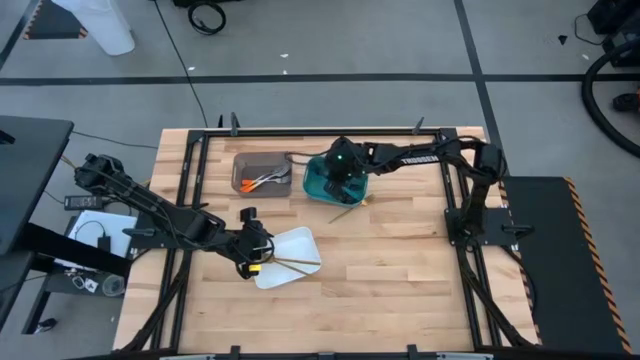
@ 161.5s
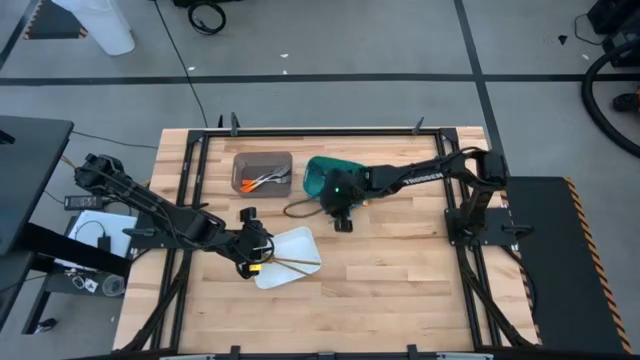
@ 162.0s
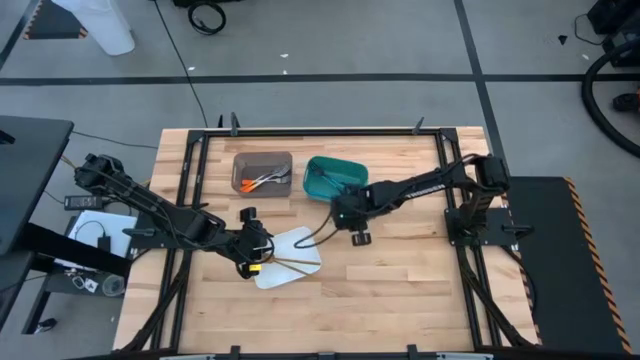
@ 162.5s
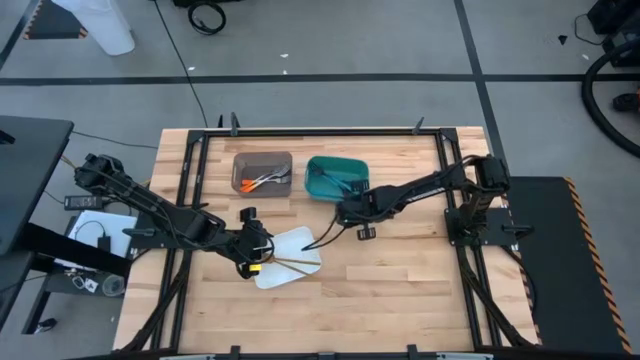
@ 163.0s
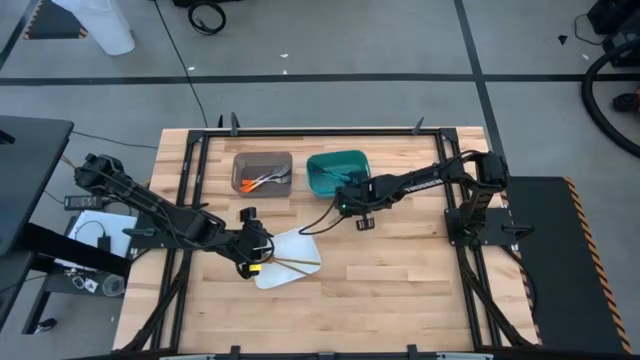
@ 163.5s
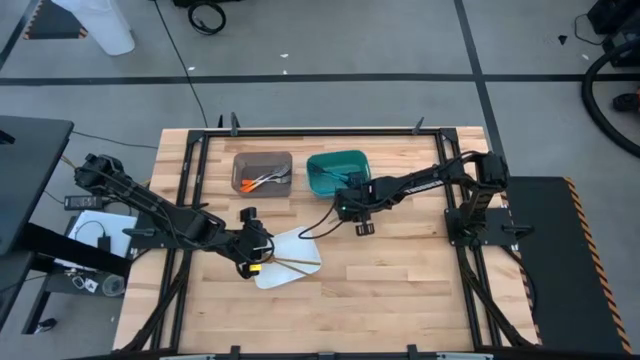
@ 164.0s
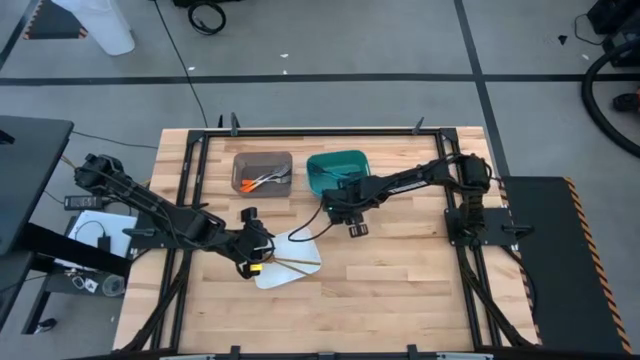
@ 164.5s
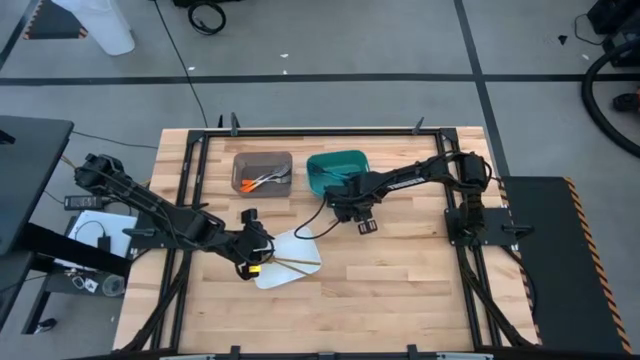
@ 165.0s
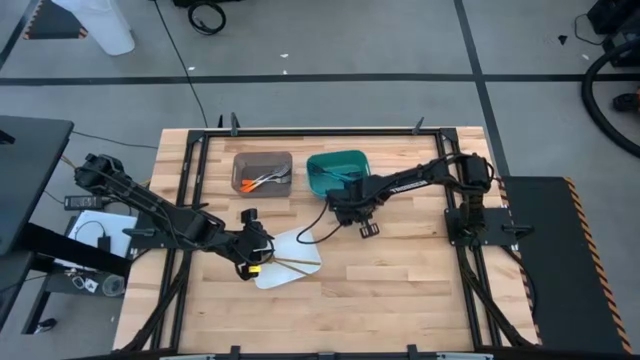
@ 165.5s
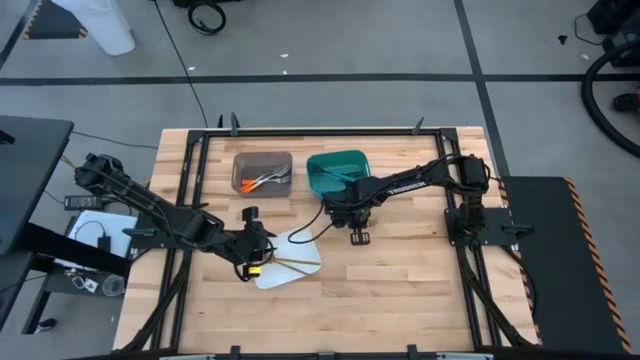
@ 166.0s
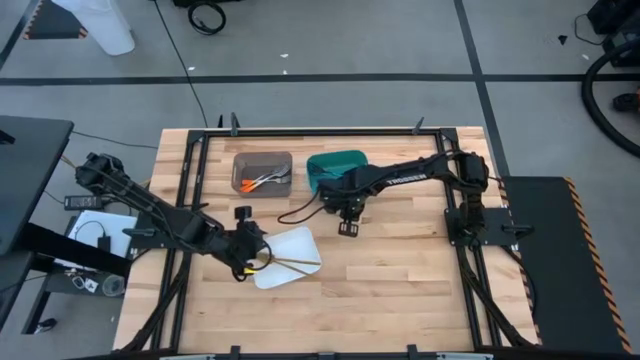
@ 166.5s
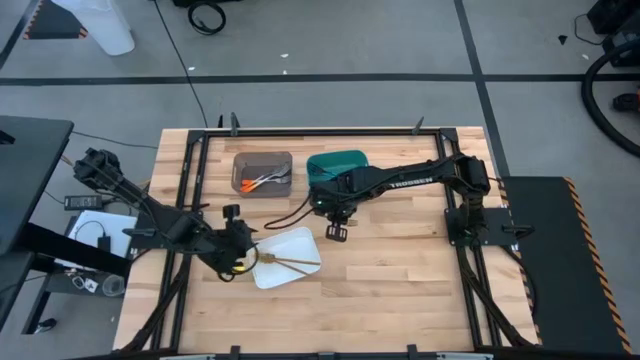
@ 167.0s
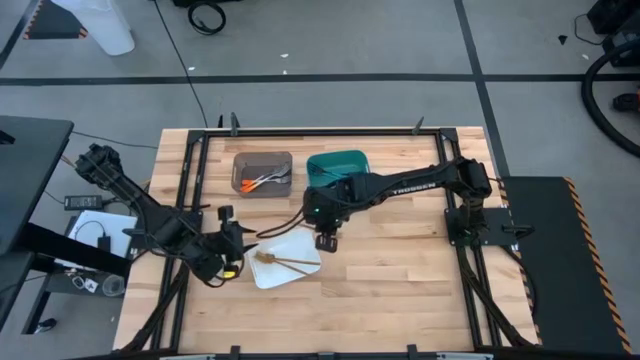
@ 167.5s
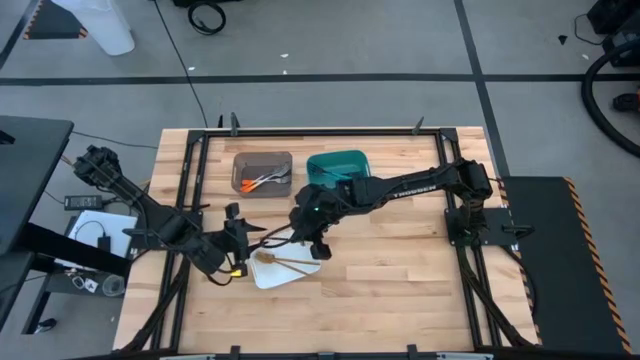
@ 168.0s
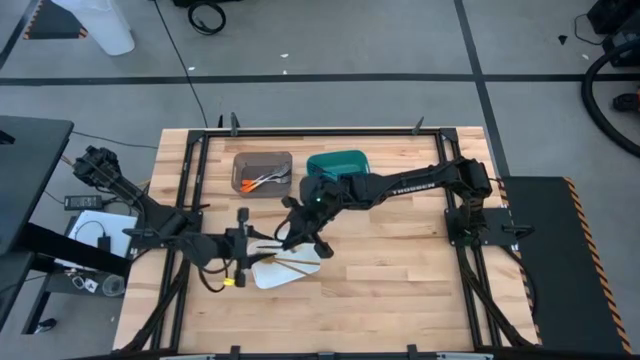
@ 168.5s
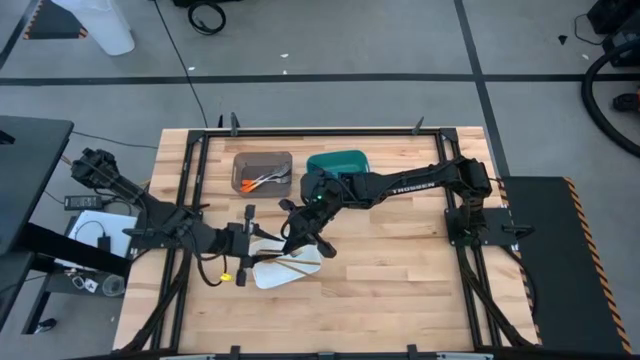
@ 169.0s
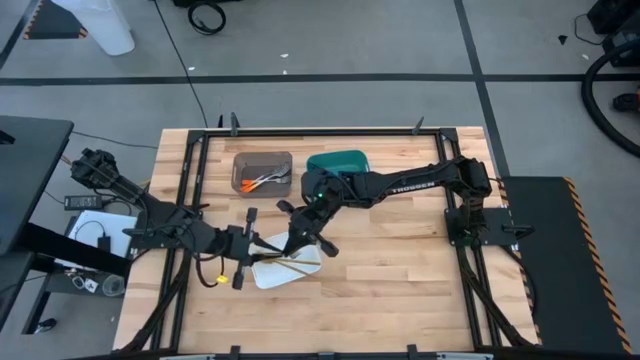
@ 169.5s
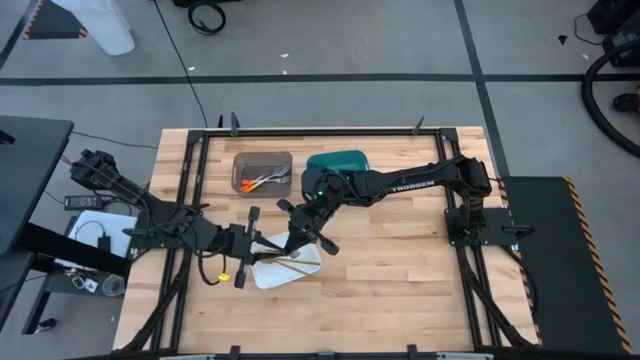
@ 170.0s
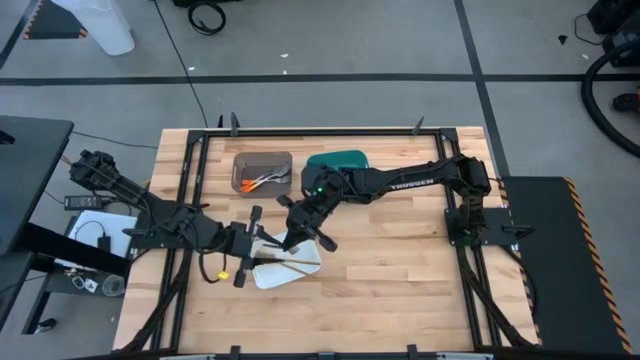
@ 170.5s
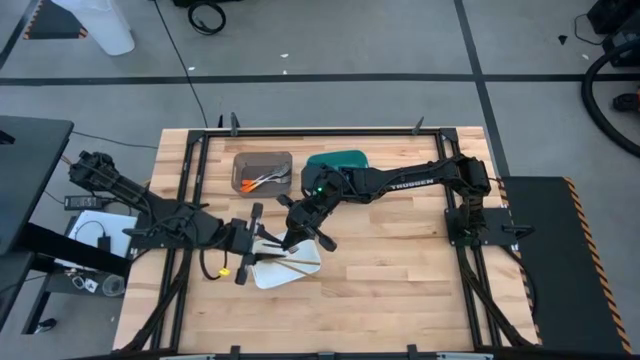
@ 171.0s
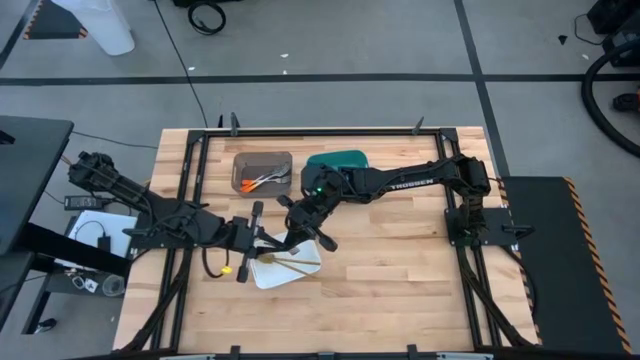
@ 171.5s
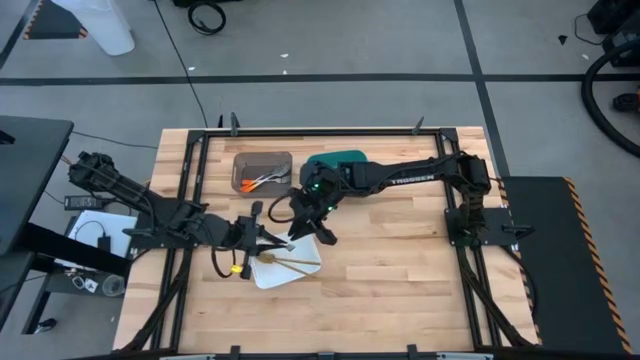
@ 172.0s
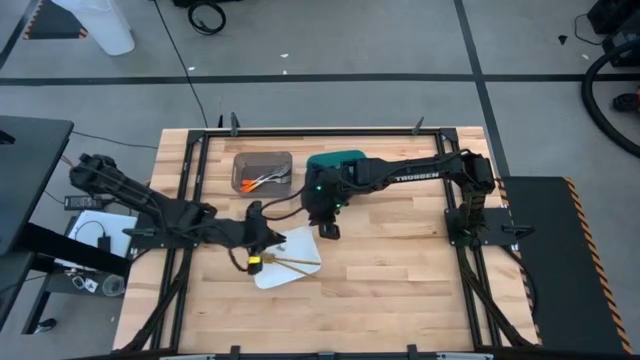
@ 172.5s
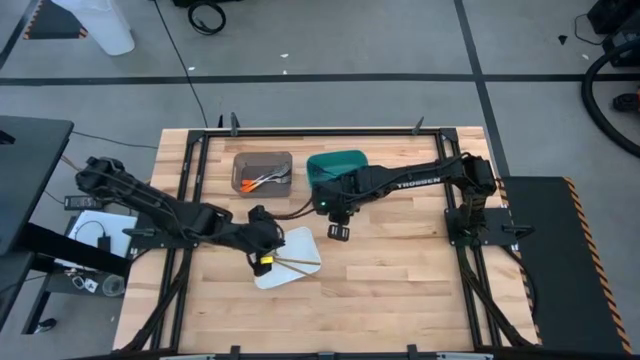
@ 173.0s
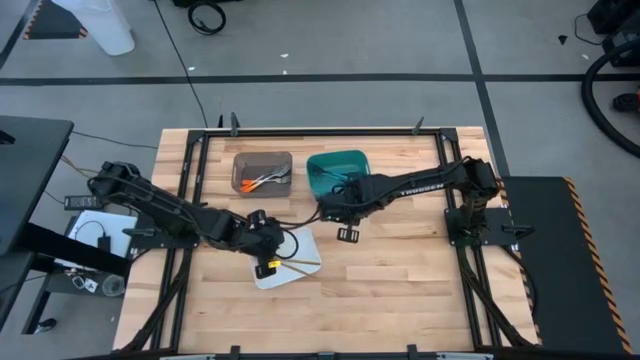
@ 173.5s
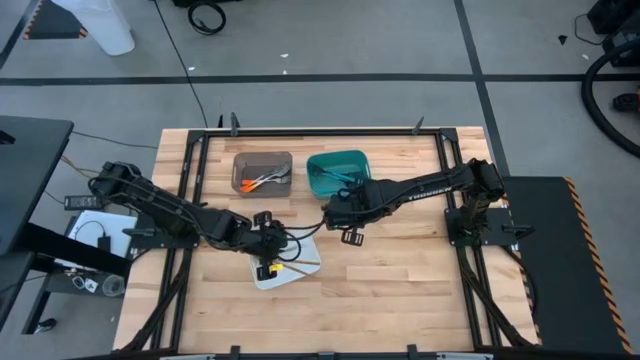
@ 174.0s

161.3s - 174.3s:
Task: Sort silverware by color (type)
Put the gold fork into the white bin

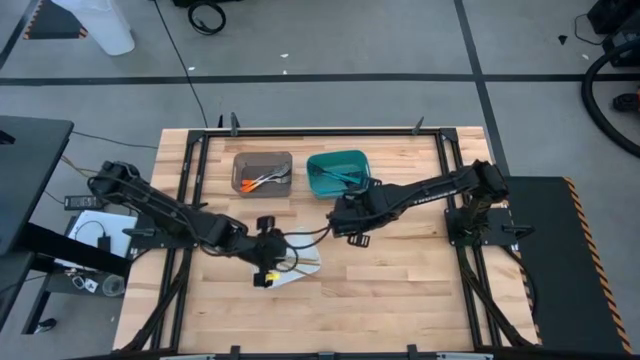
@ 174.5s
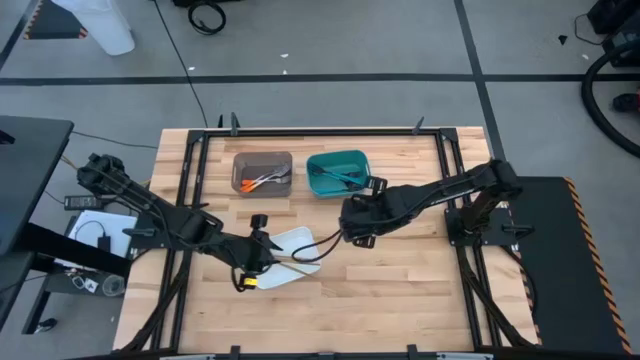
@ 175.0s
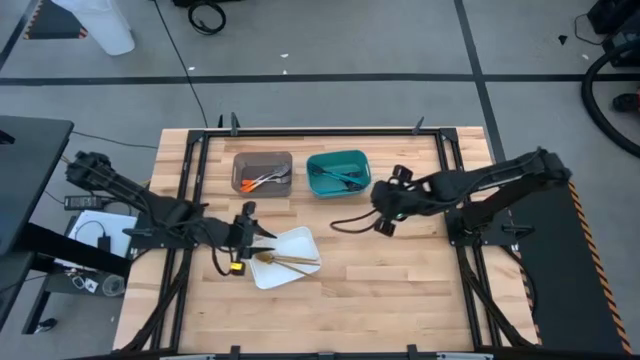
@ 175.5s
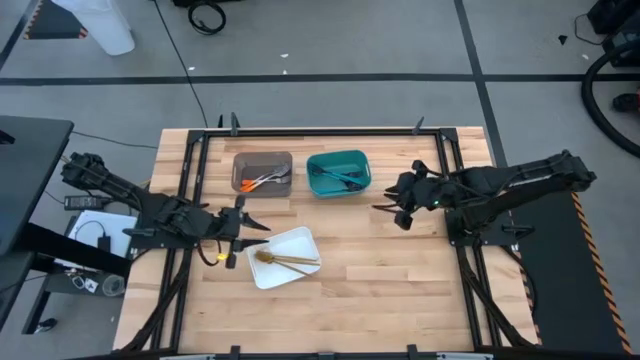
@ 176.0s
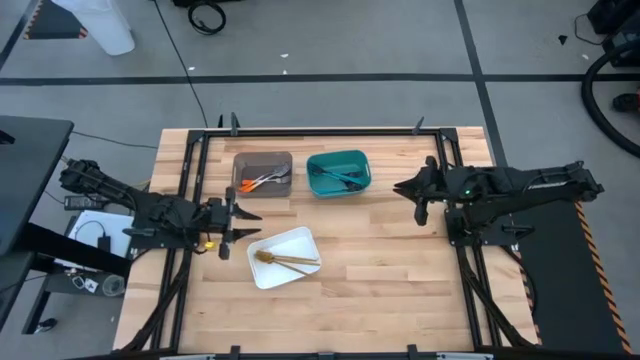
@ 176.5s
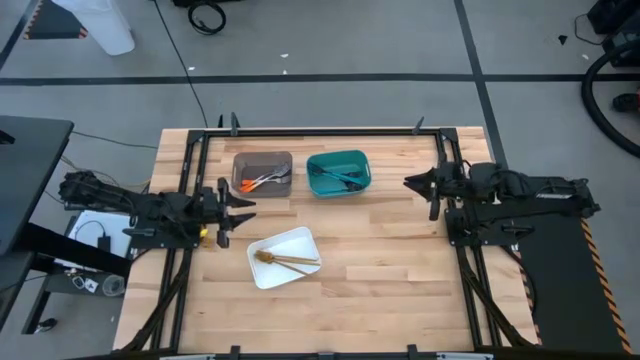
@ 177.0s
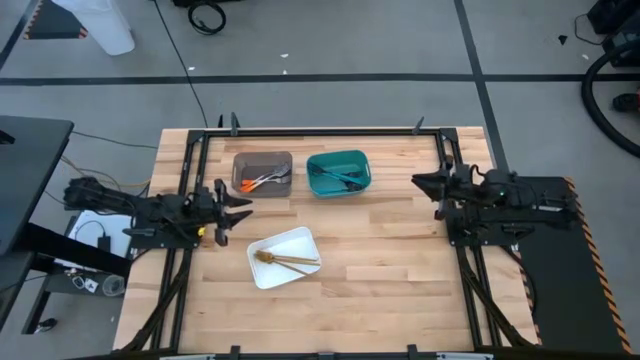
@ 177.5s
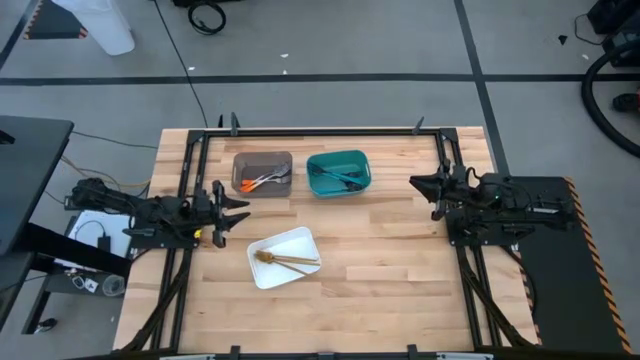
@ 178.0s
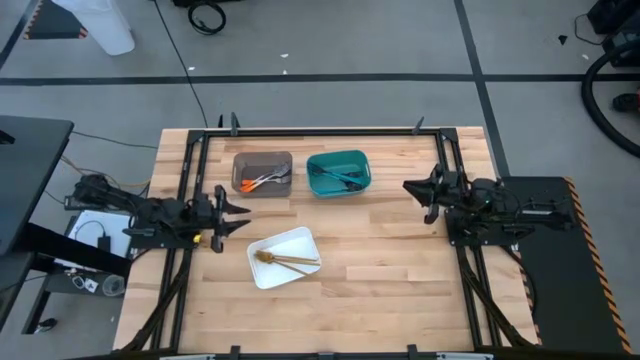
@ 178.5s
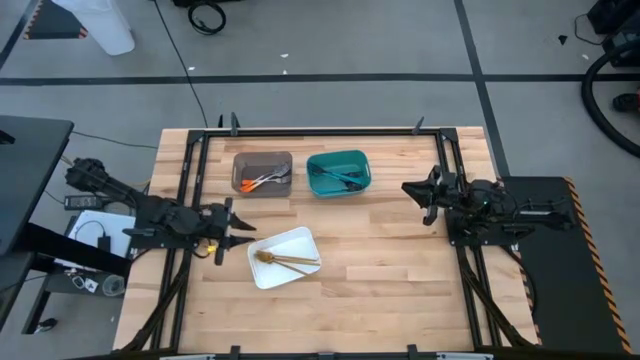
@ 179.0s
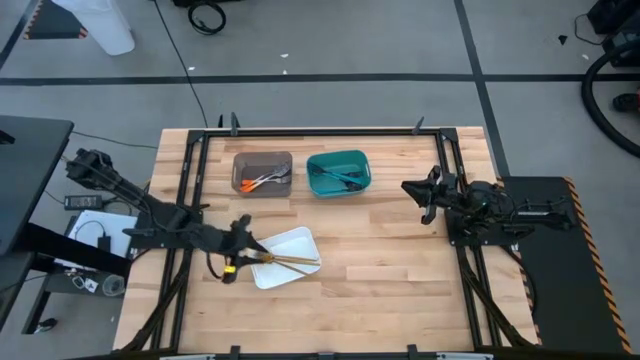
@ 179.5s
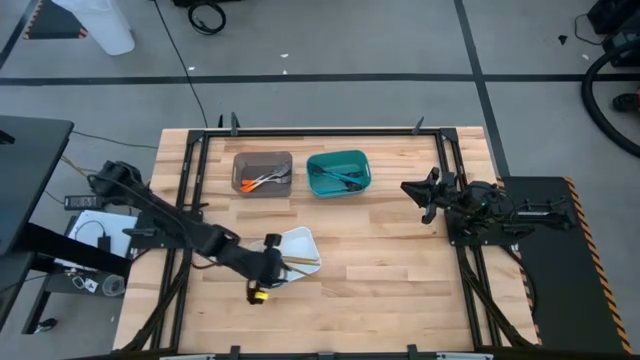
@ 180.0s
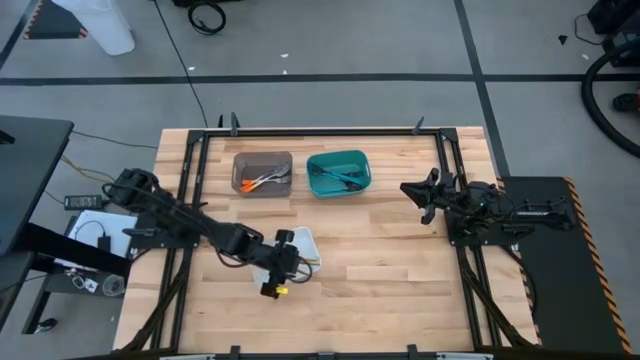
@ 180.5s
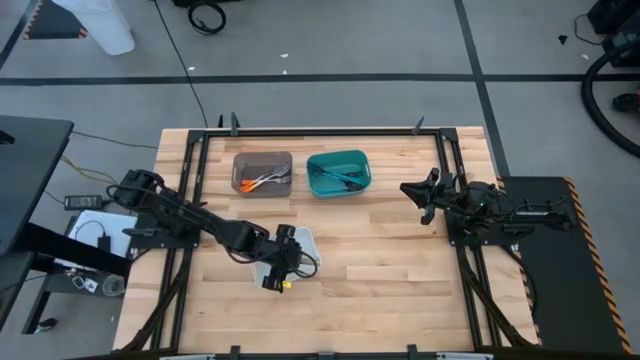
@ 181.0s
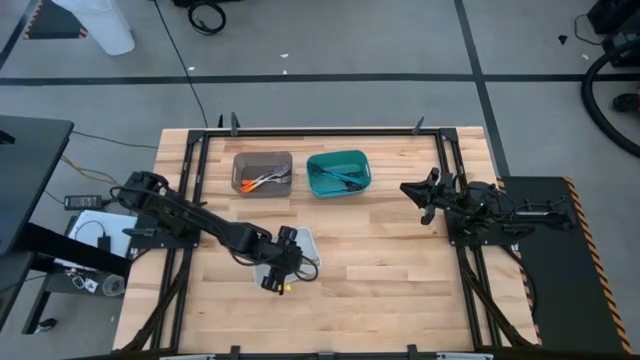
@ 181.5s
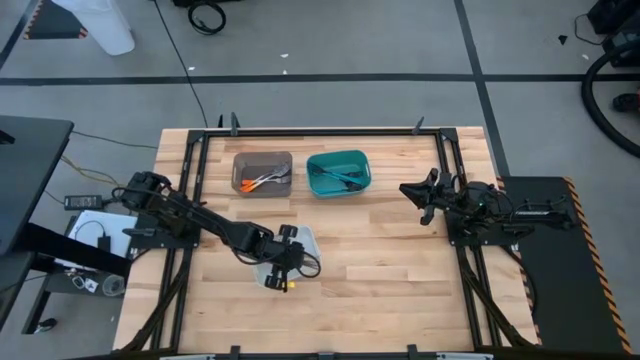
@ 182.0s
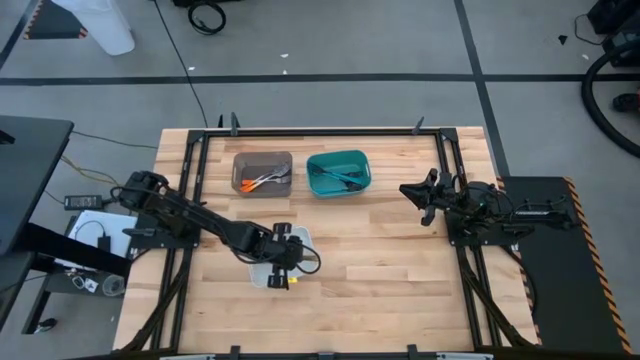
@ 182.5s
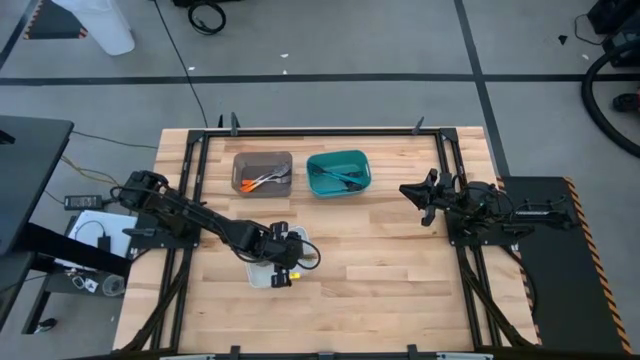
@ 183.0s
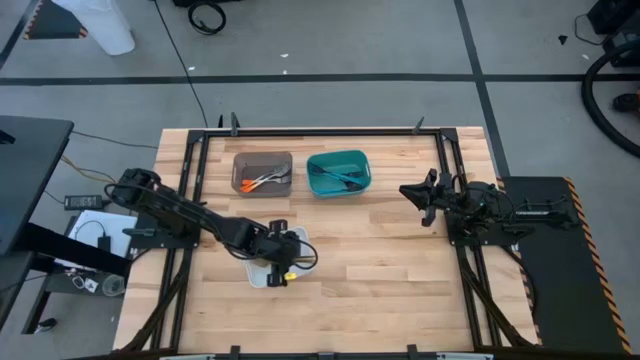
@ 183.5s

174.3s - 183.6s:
Adjust the gold forks in the white bin
